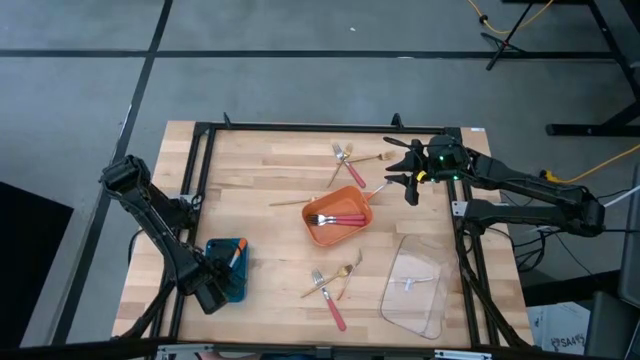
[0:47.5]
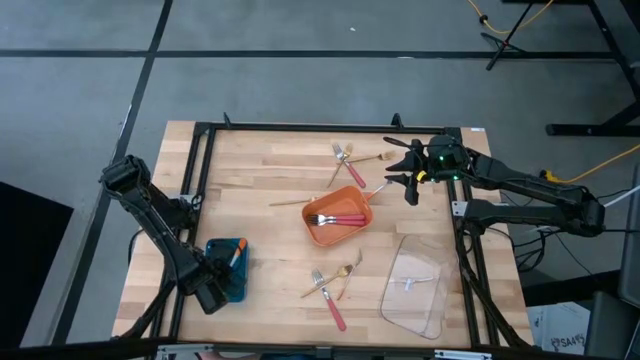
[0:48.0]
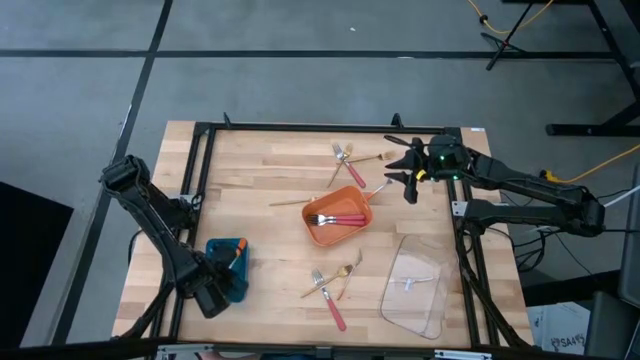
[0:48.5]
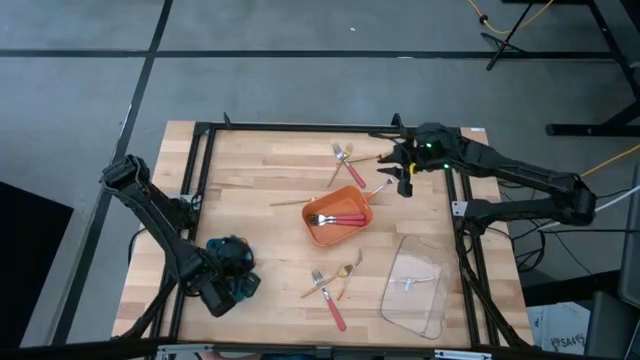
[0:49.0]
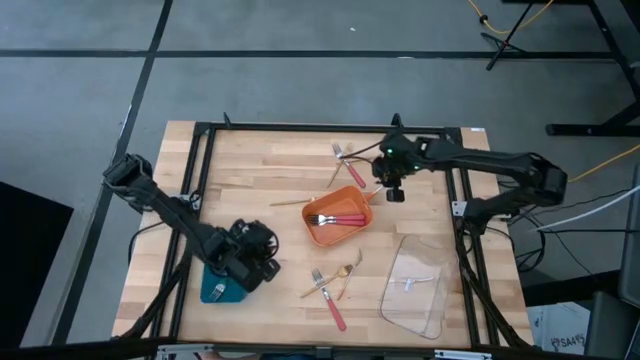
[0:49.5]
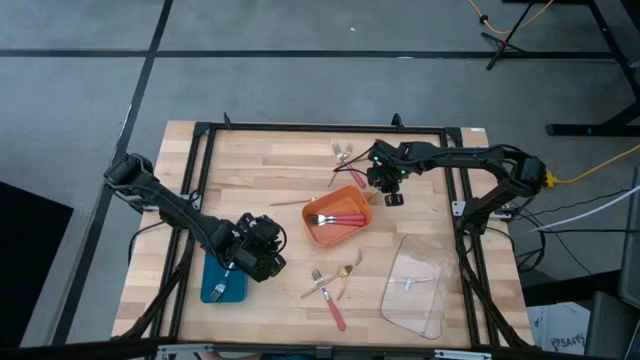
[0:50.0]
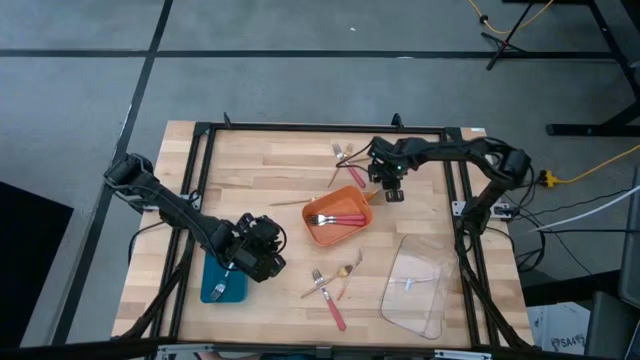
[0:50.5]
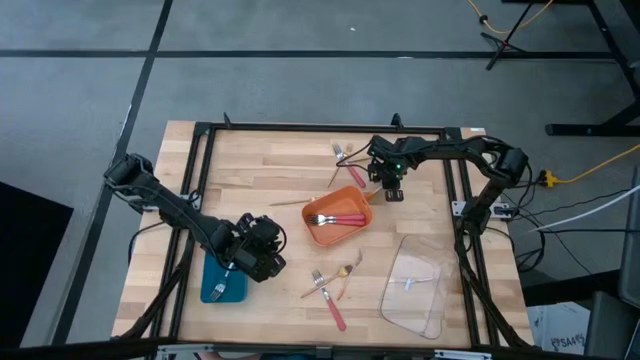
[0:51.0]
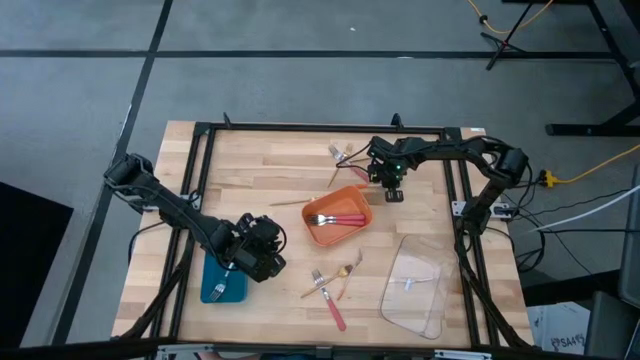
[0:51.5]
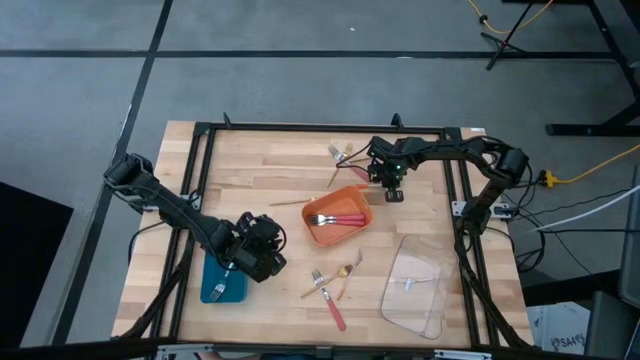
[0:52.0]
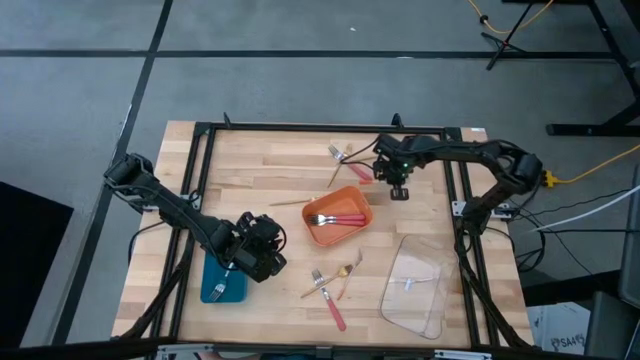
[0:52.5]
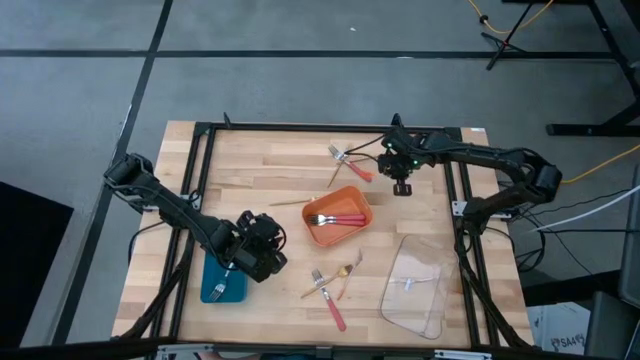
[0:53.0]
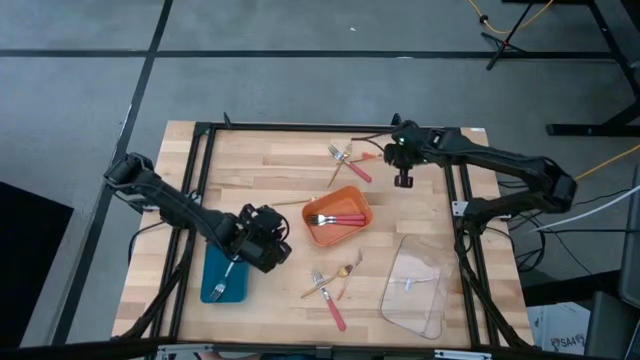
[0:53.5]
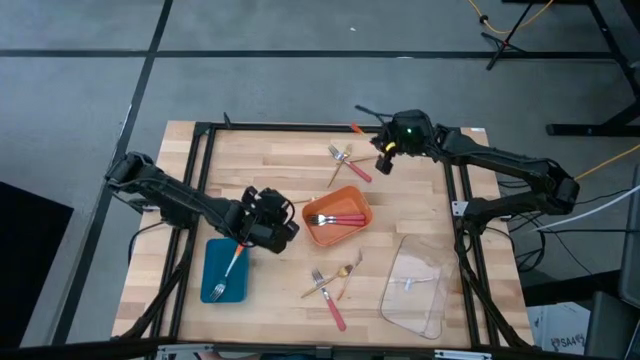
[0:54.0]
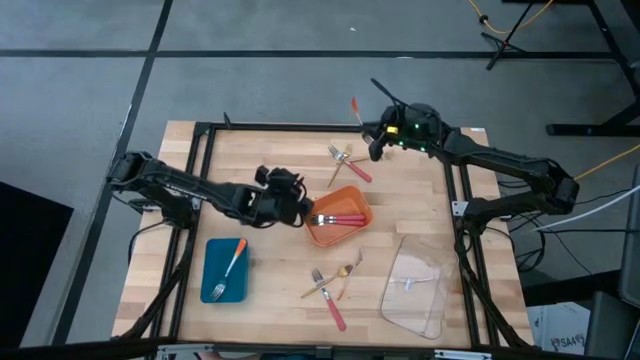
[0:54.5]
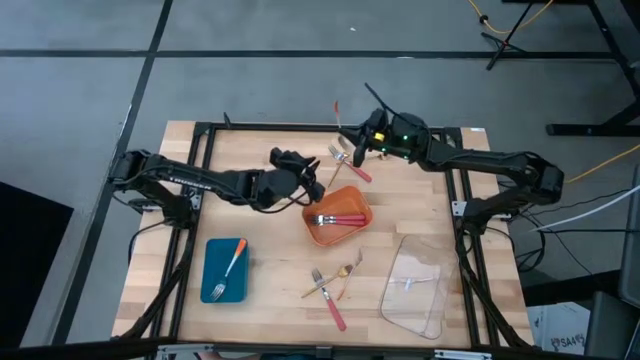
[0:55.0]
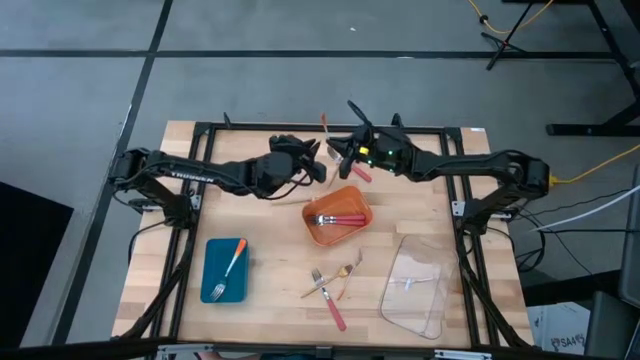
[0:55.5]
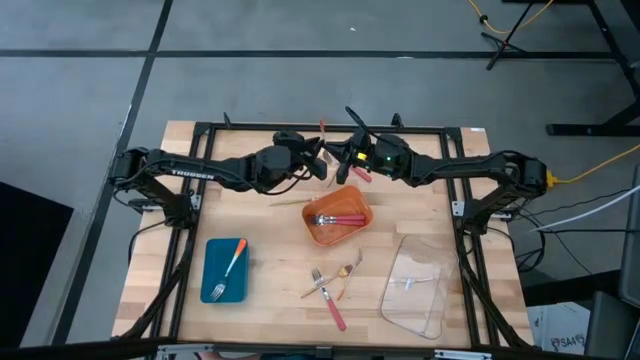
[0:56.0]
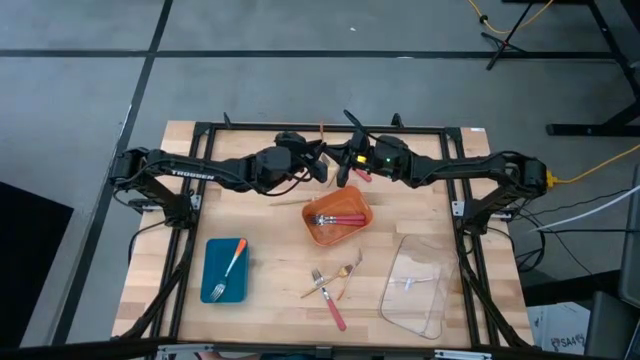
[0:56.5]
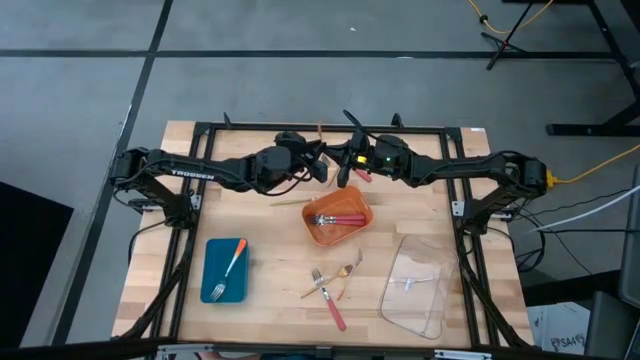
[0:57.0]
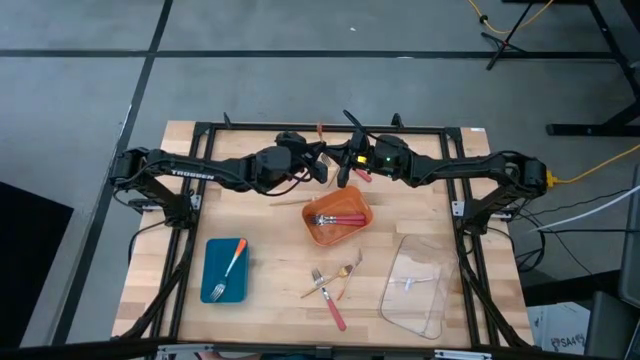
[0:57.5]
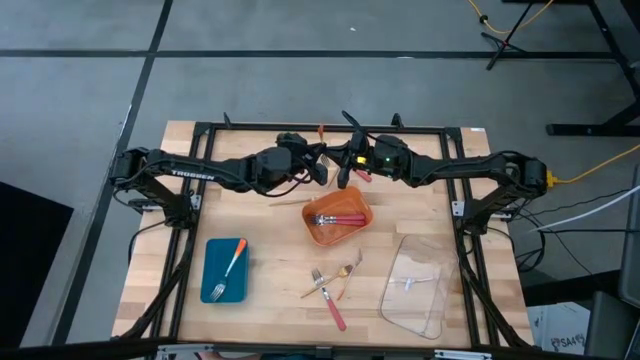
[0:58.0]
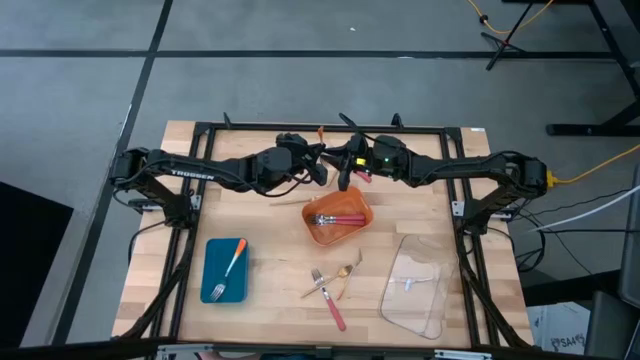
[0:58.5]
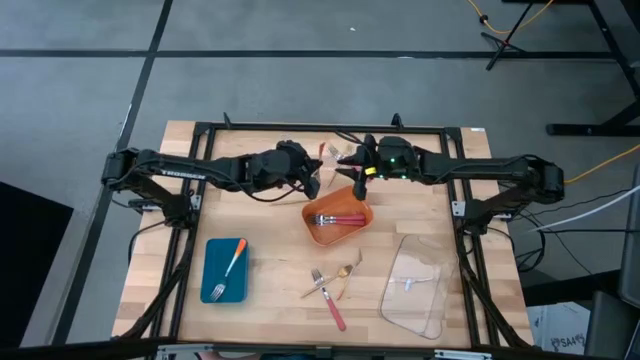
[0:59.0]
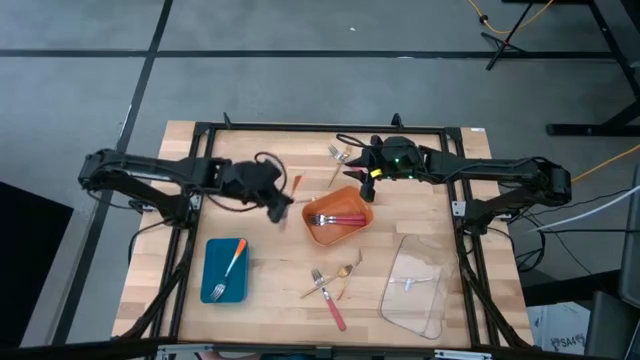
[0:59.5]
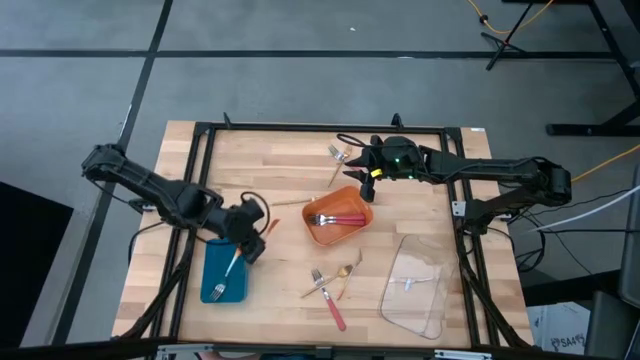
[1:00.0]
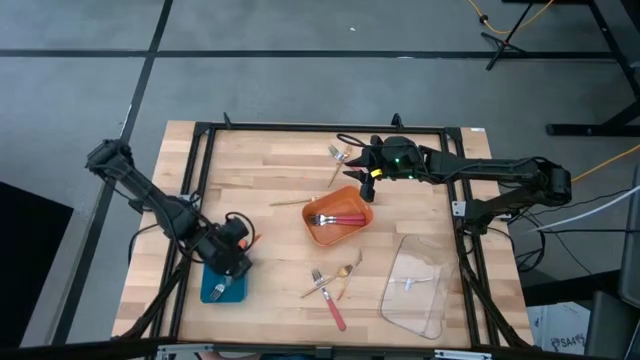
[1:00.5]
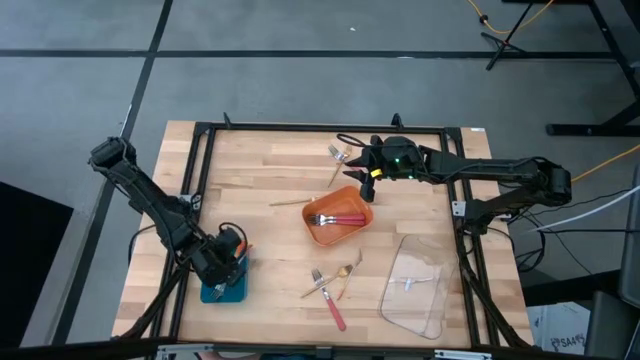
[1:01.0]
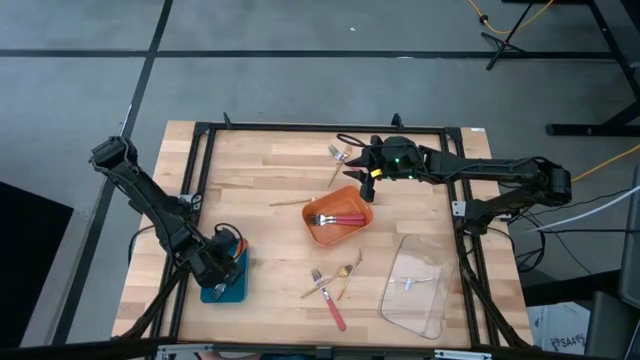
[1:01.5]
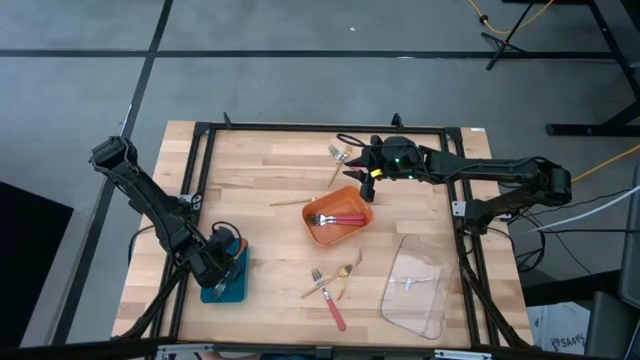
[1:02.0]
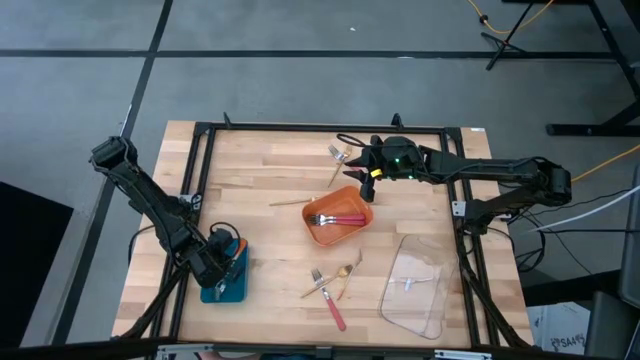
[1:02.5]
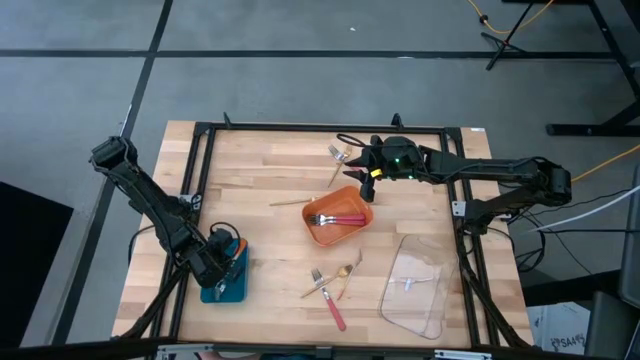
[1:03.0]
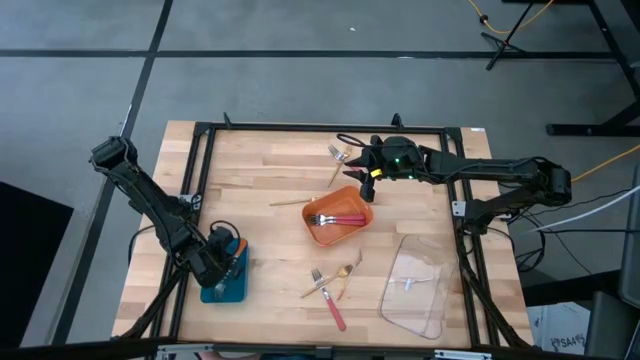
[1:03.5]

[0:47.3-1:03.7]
Task: Sort silverware by color (type)
Put the orange fork into the blue bin

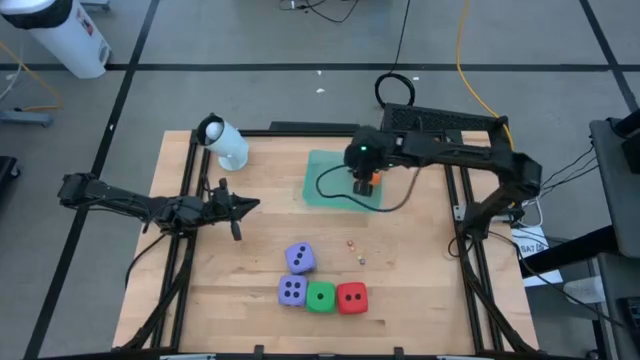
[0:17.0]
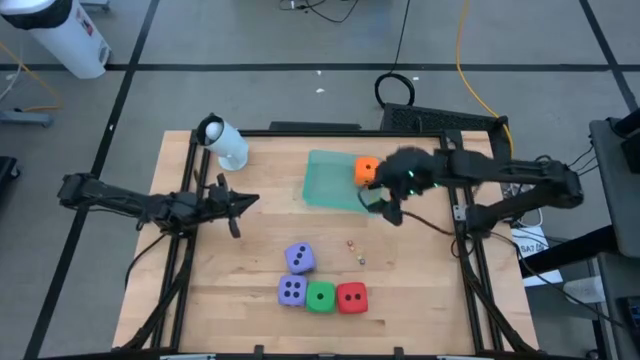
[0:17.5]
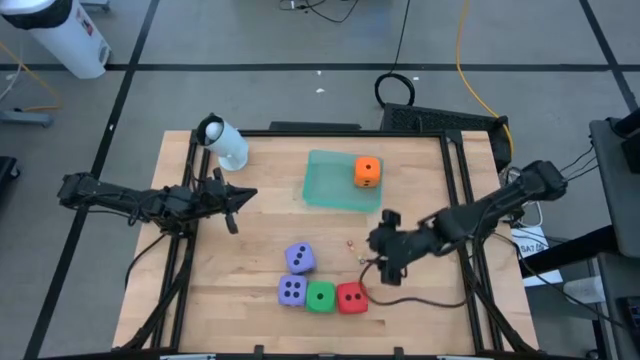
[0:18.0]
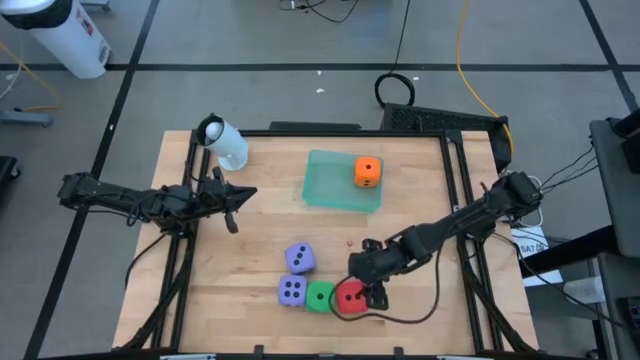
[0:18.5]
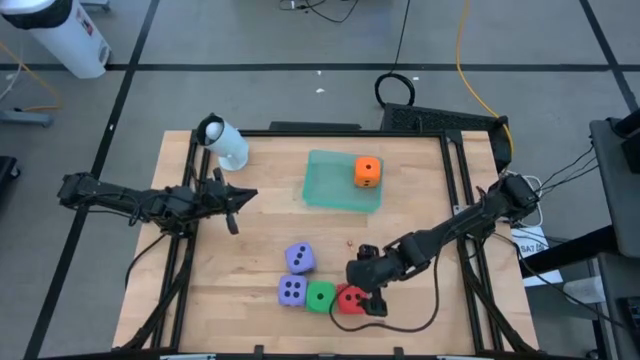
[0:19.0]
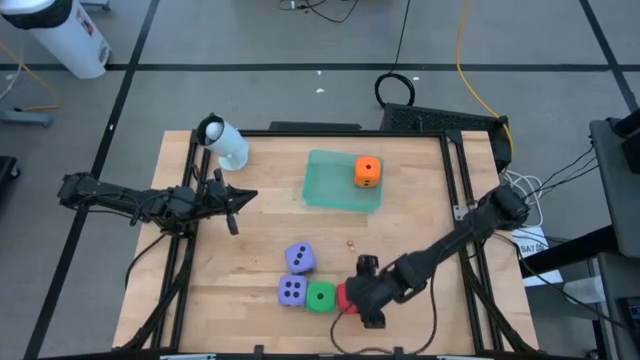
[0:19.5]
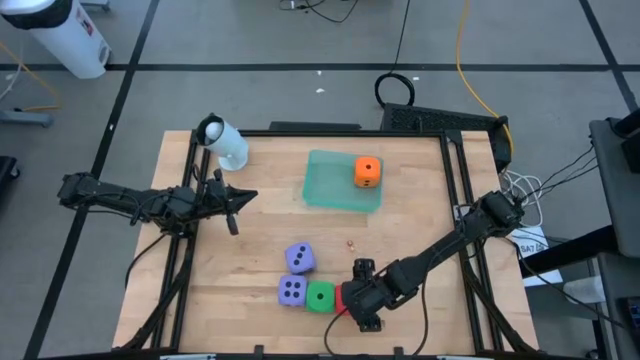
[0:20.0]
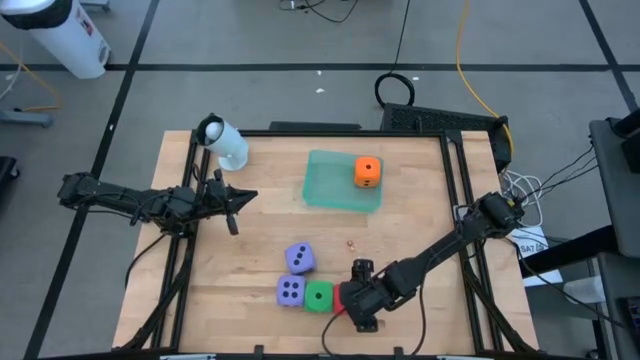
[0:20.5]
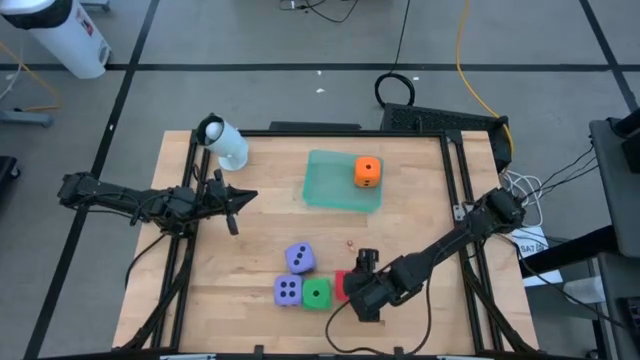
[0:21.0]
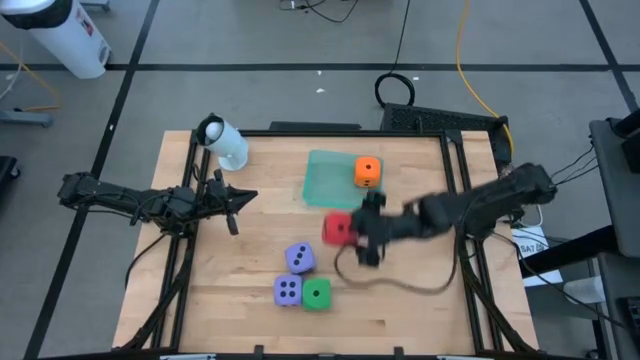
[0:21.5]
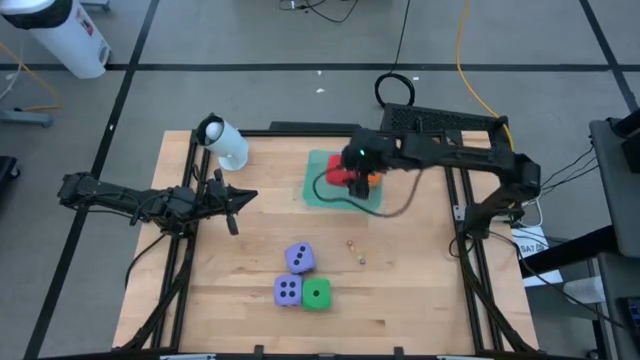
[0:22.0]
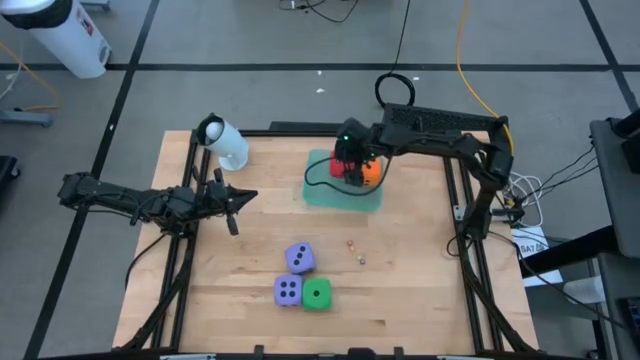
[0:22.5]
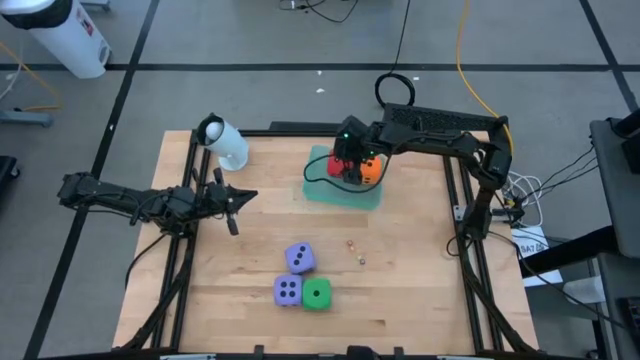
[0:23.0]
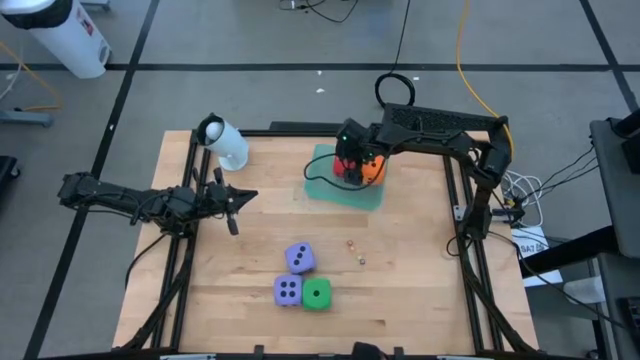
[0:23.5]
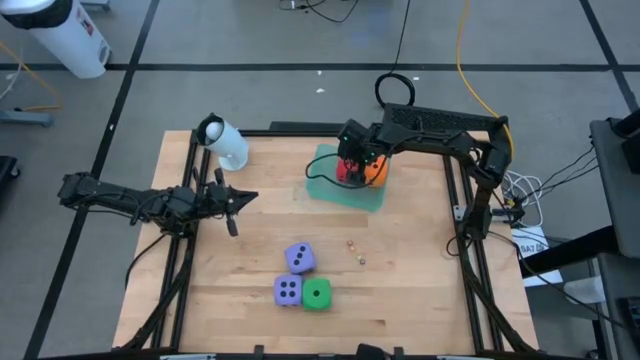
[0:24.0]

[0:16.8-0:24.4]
Task: Pick & Place Dice
Put the large red die into the green bin
